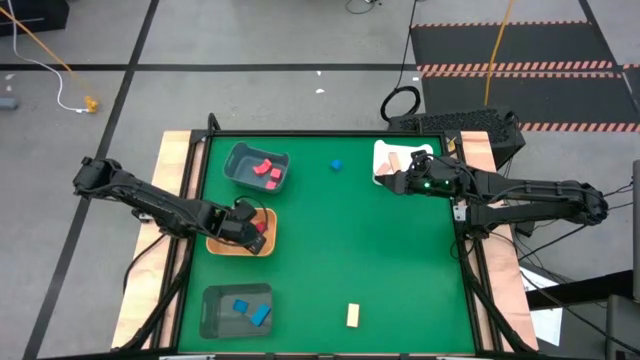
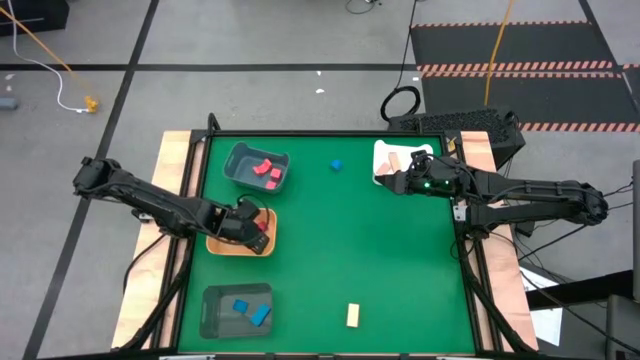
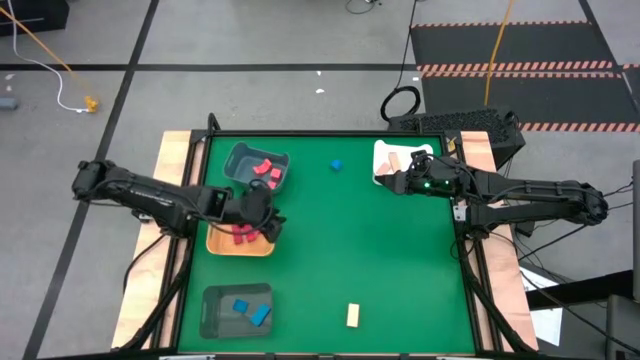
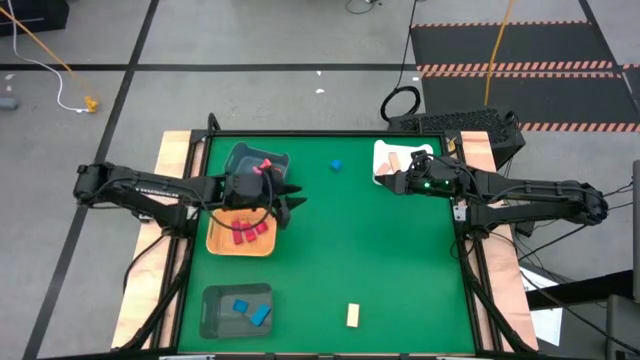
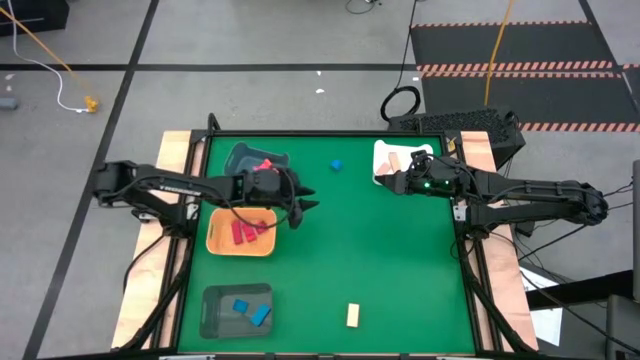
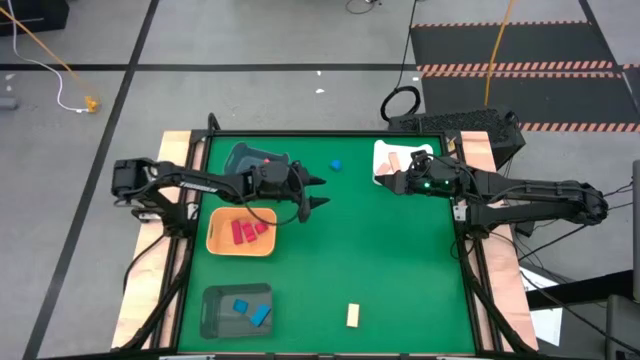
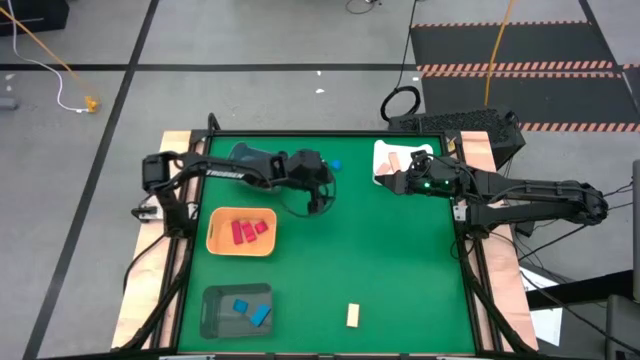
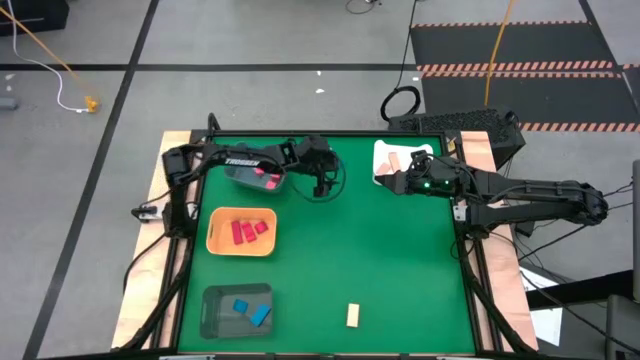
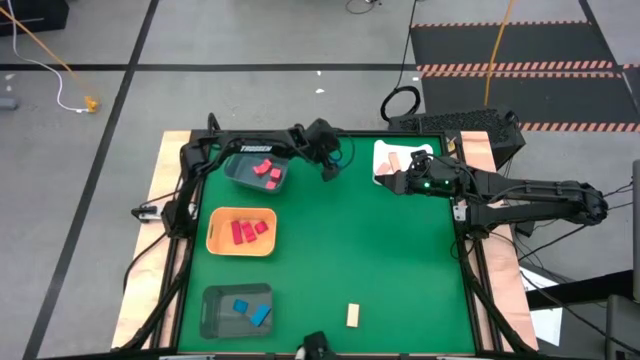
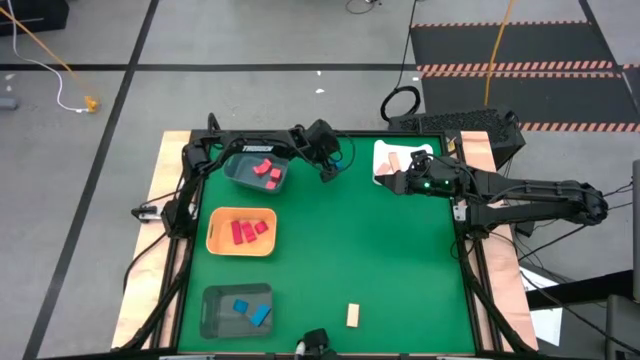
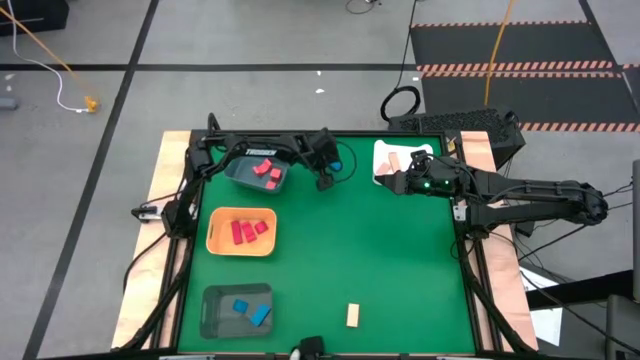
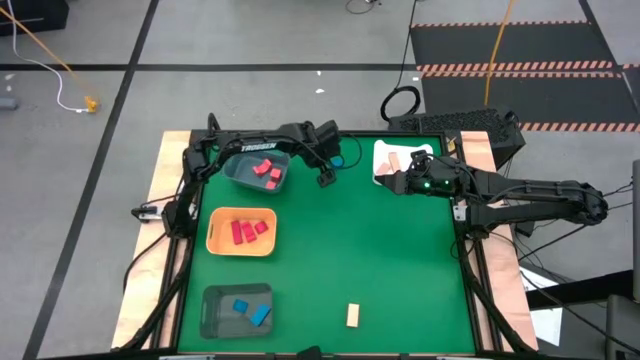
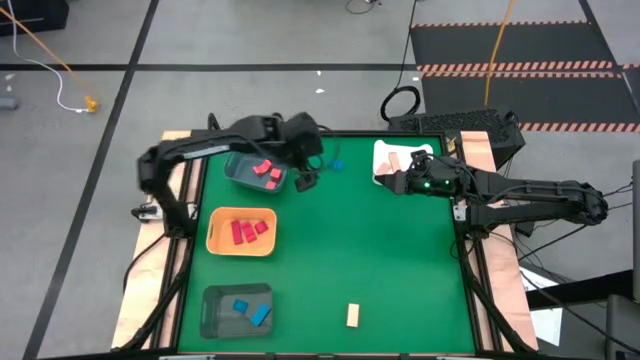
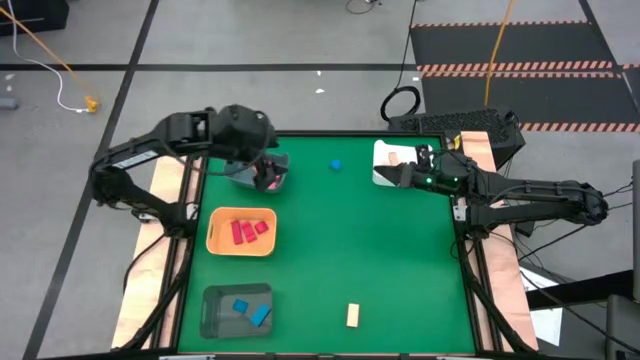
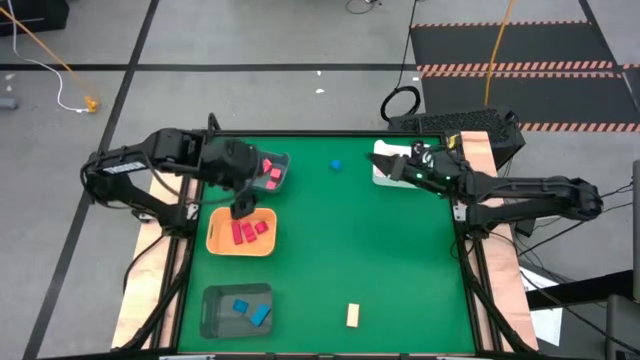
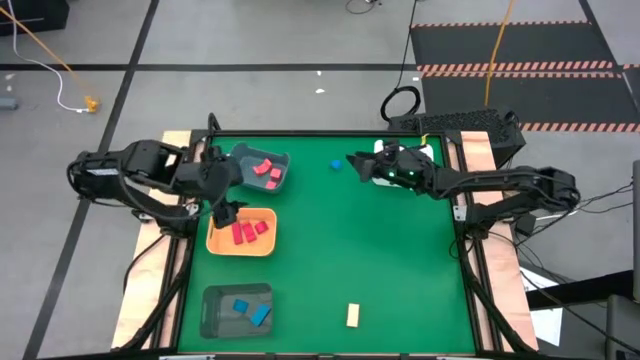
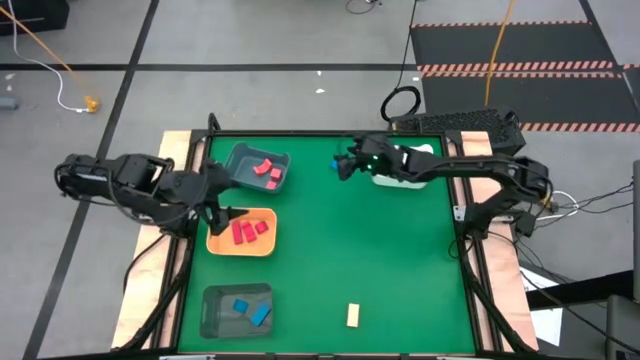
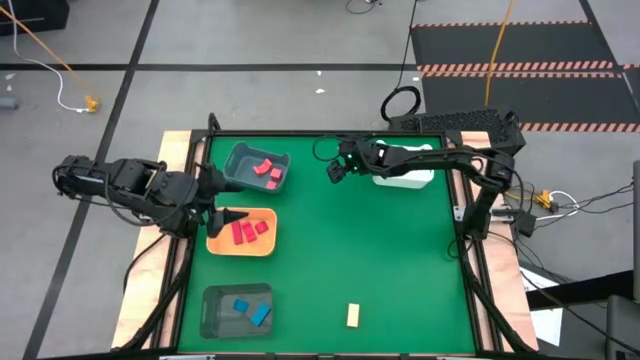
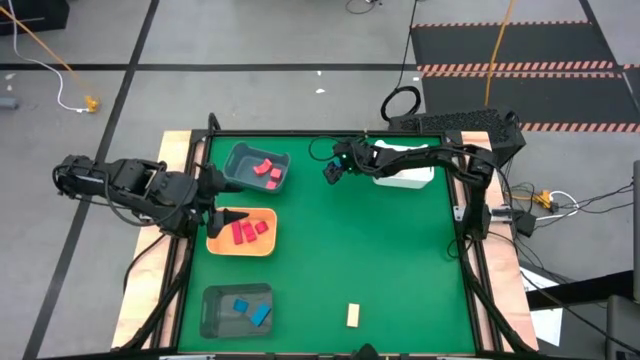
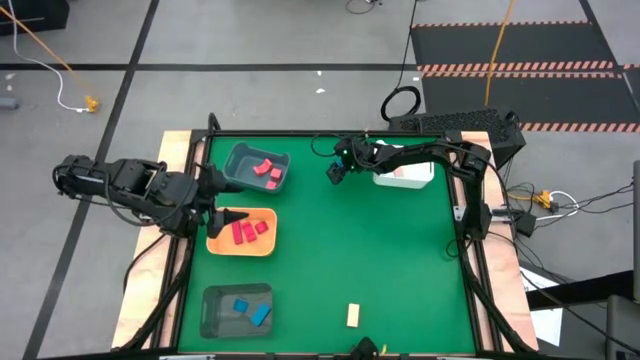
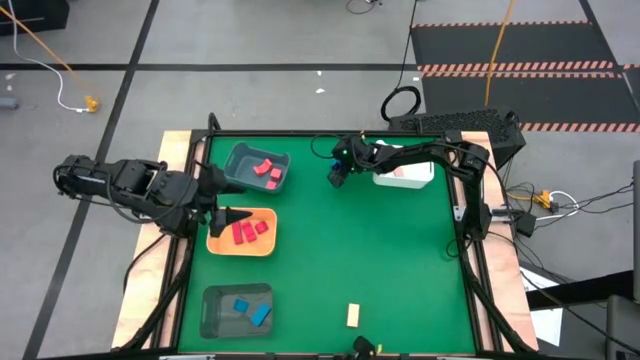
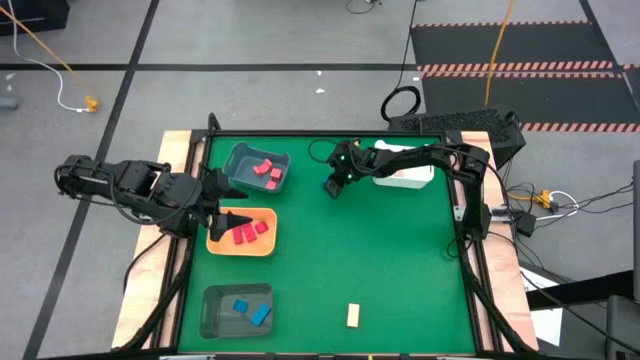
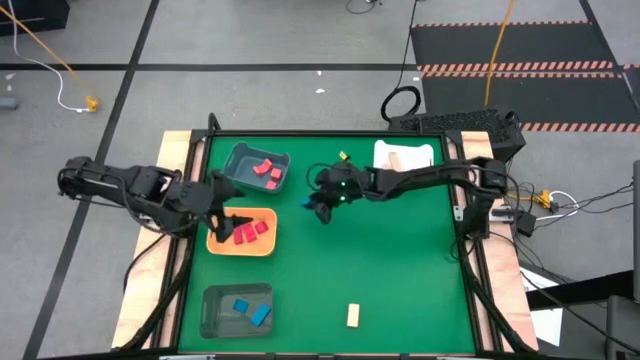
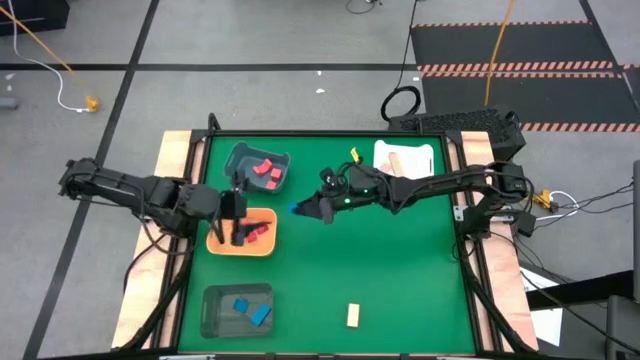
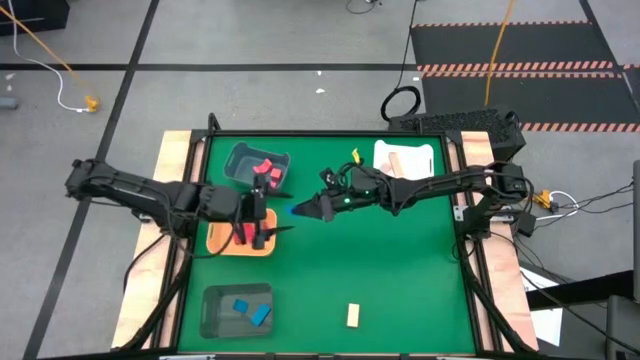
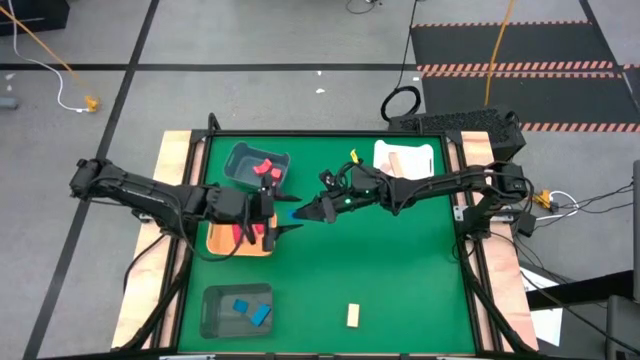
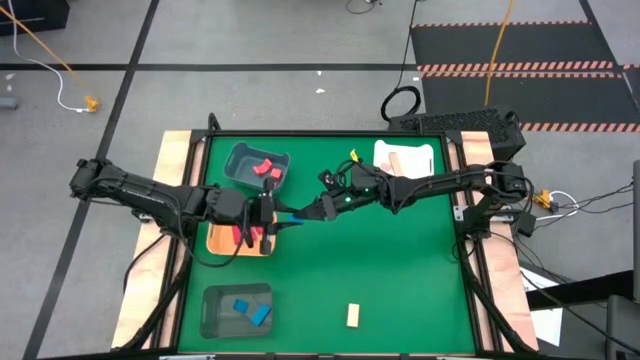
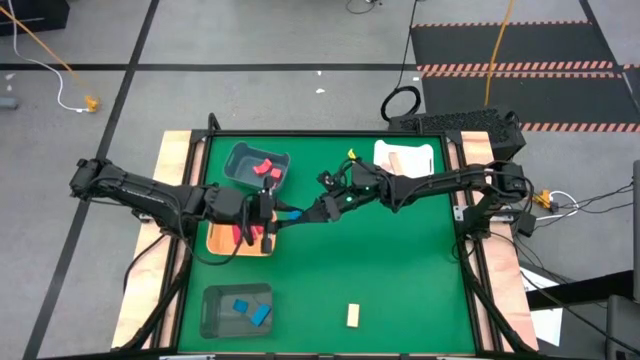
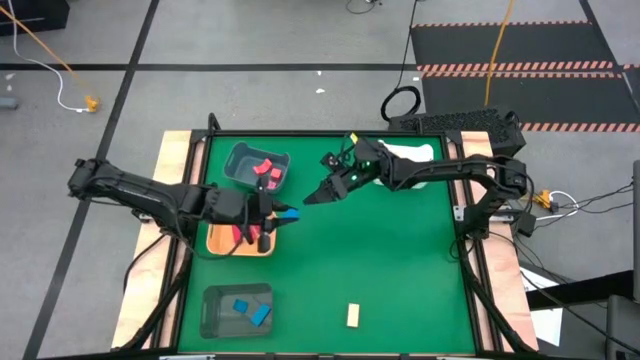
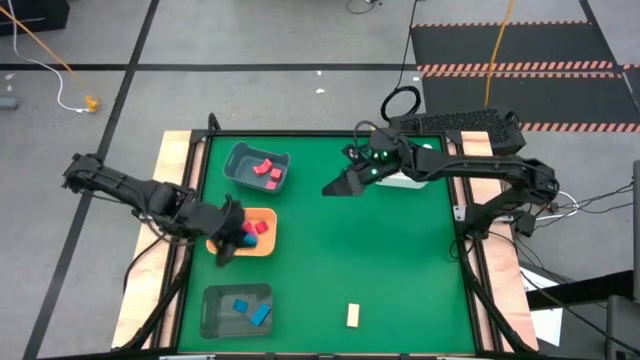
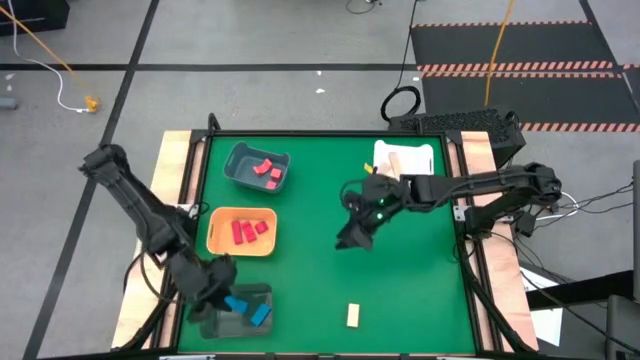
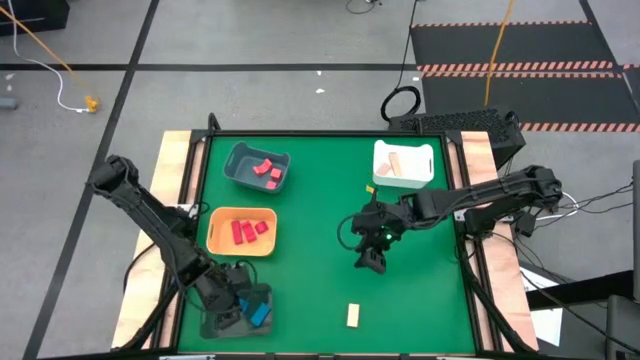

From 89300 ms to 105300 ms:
Task: Sort & place blocks by color
Put the blue block into the black bin

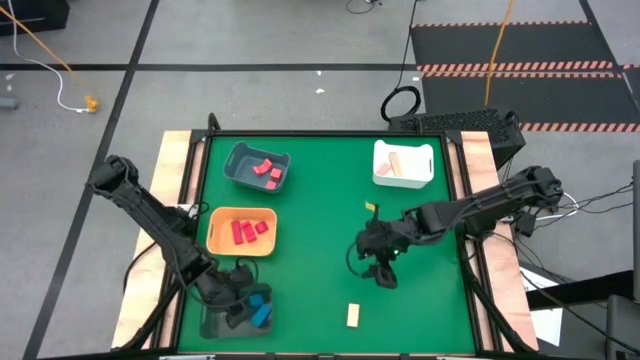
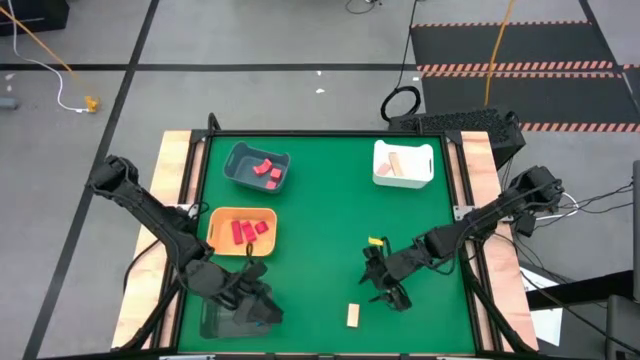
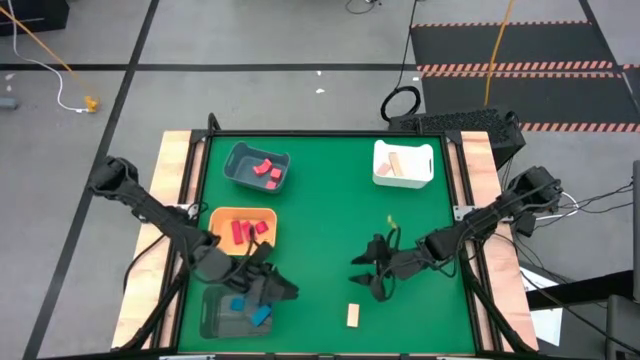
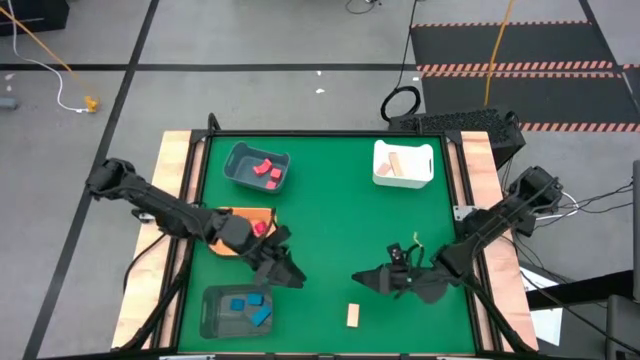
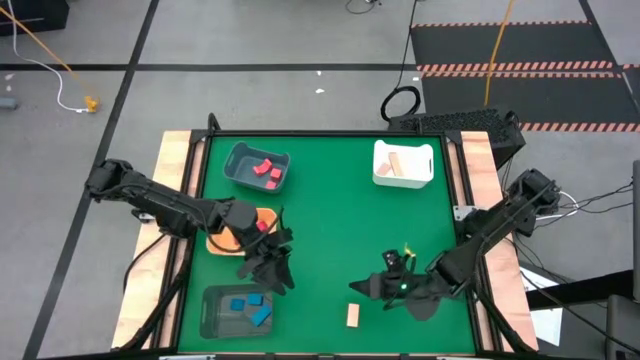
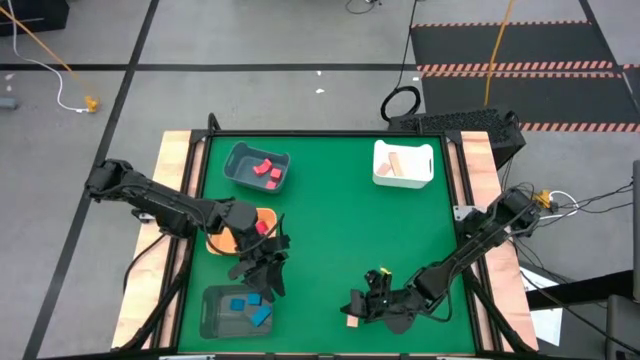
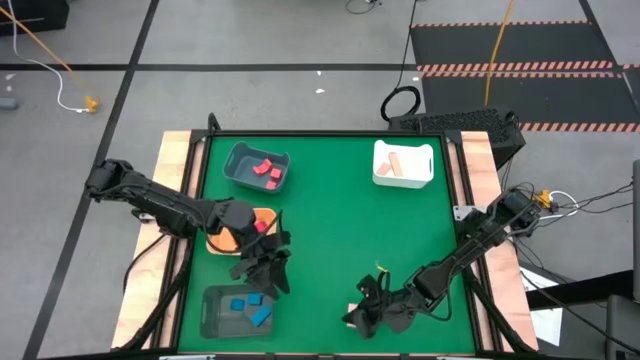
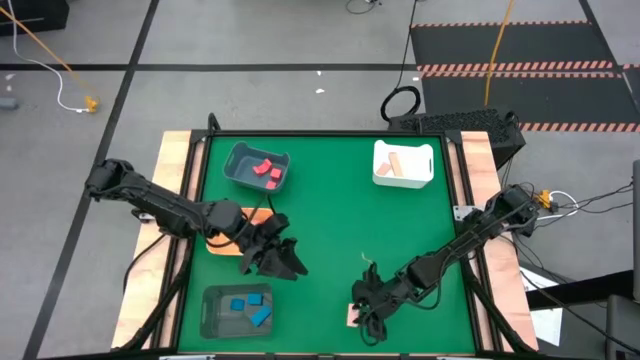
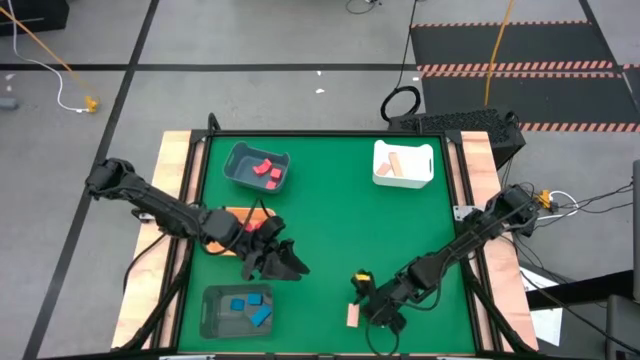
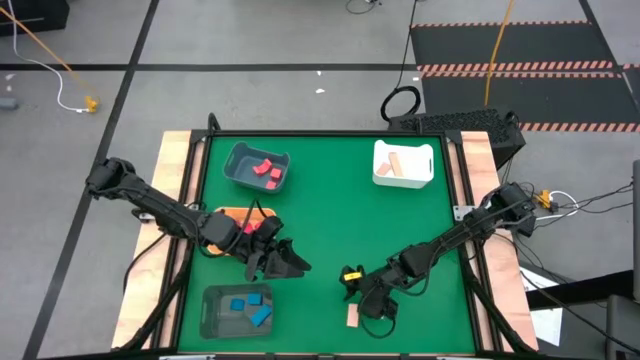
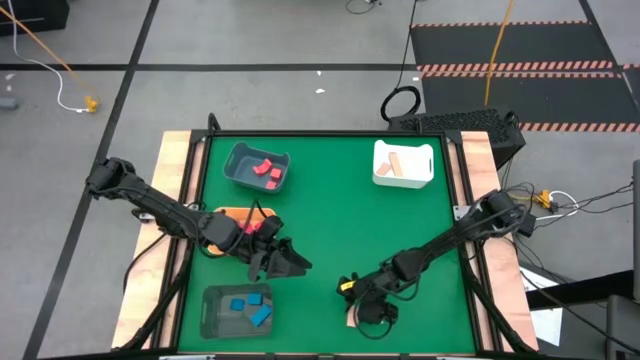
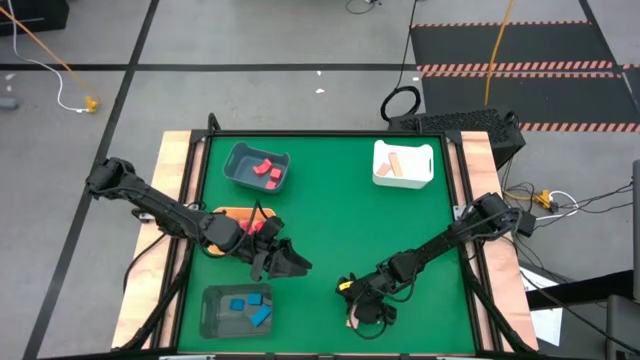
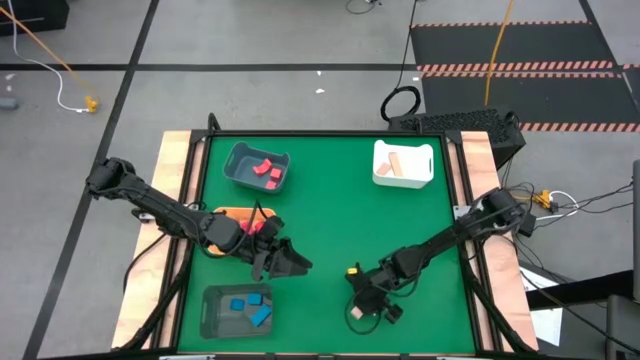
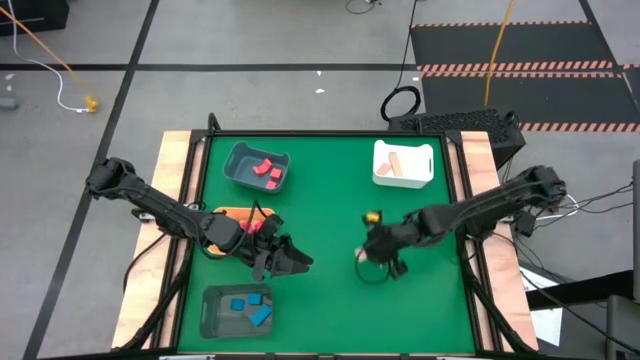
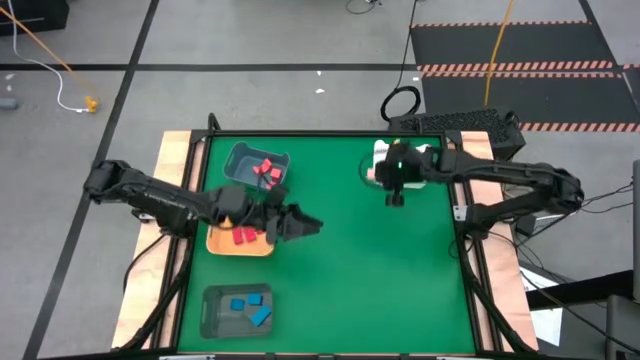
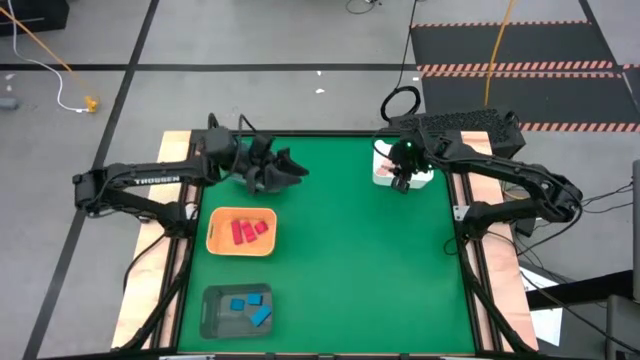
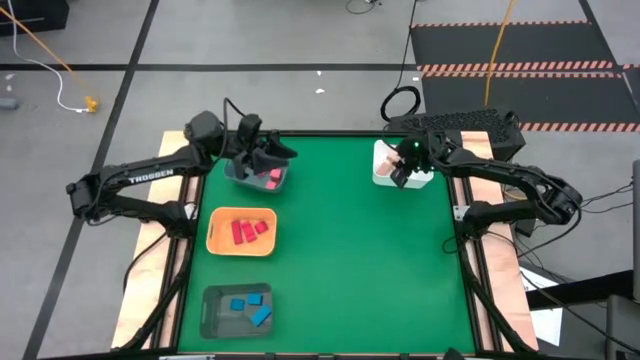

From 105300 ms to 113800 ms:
Put the brown block into the white bin
